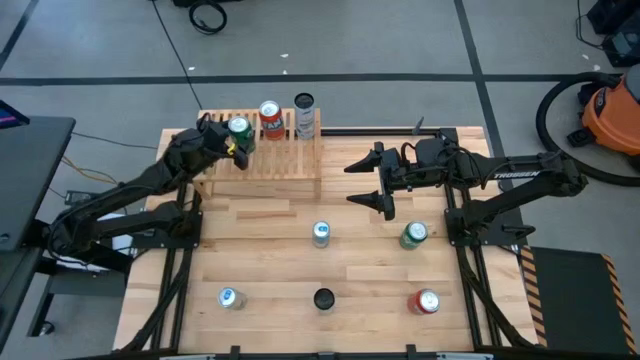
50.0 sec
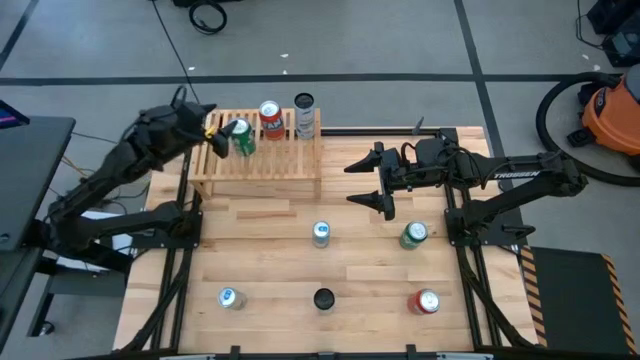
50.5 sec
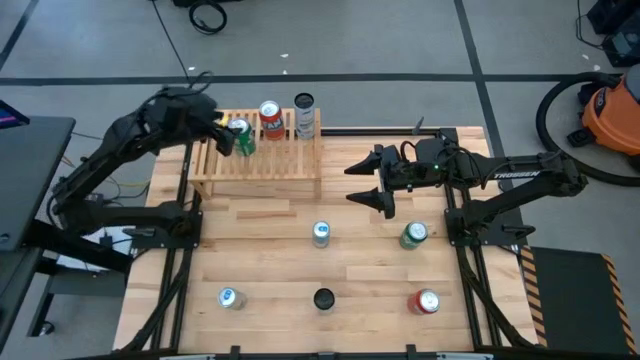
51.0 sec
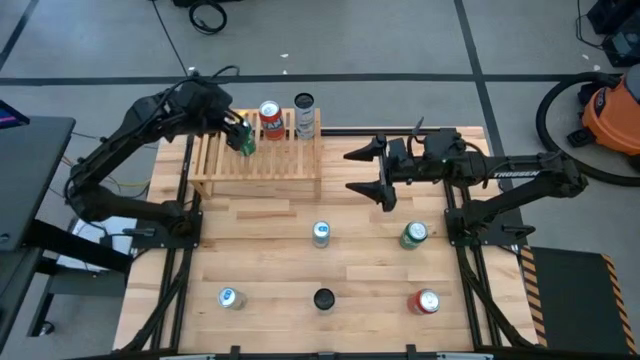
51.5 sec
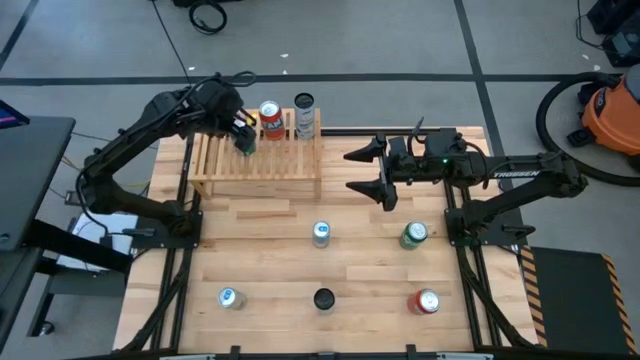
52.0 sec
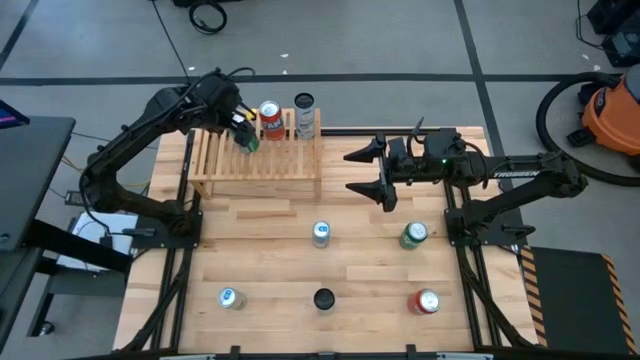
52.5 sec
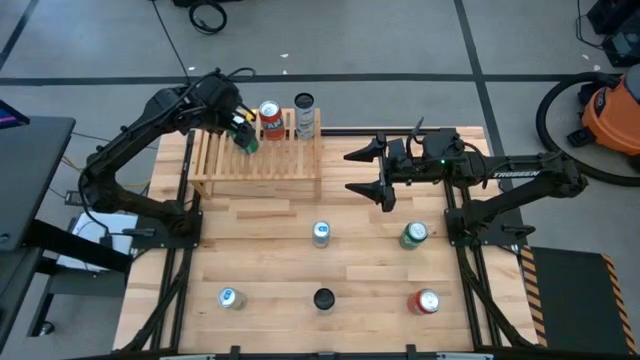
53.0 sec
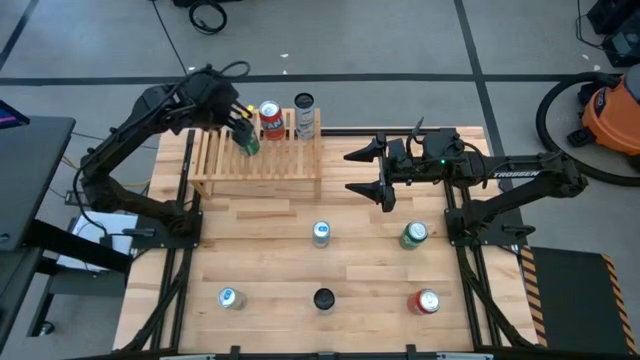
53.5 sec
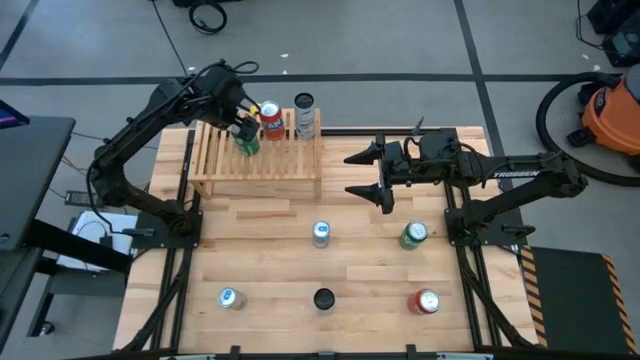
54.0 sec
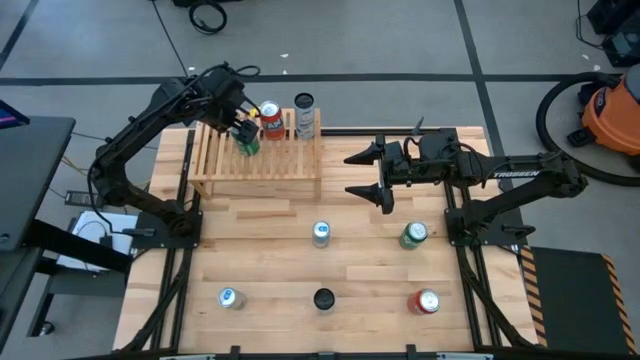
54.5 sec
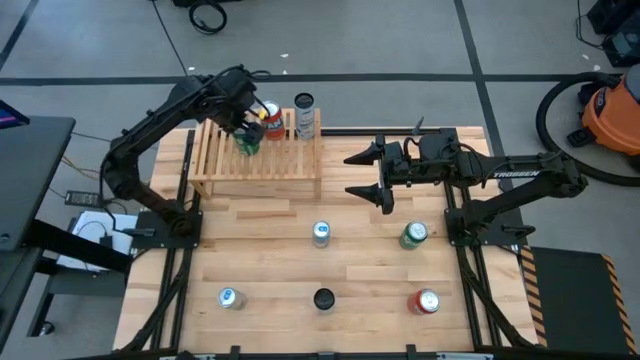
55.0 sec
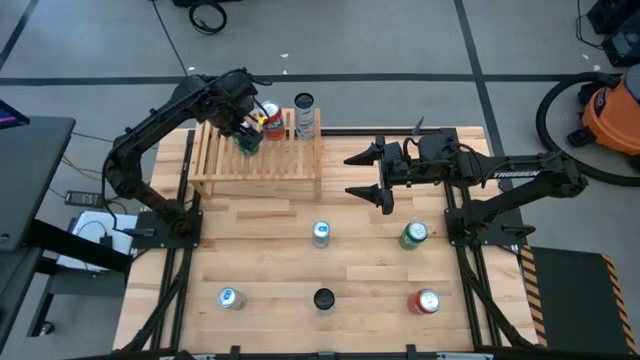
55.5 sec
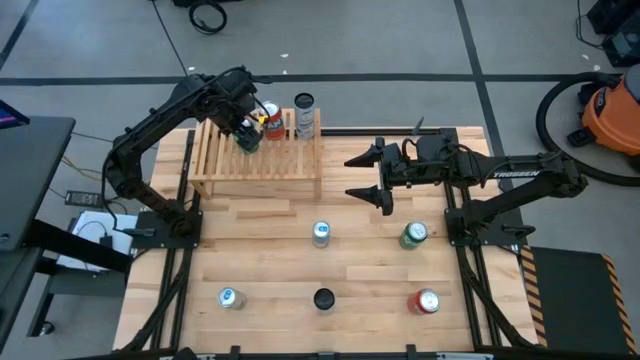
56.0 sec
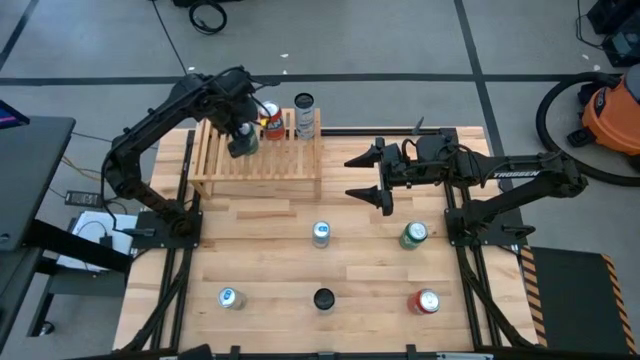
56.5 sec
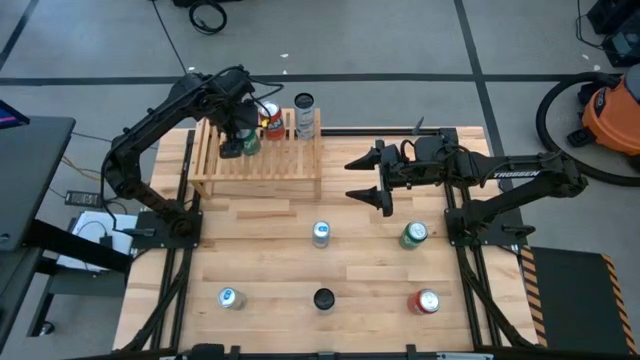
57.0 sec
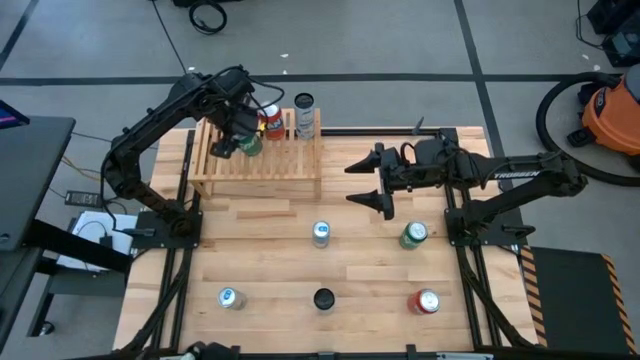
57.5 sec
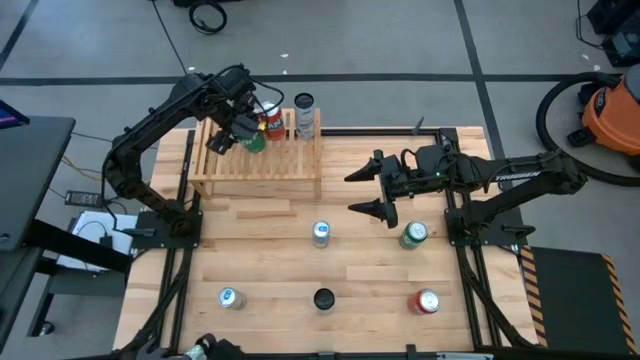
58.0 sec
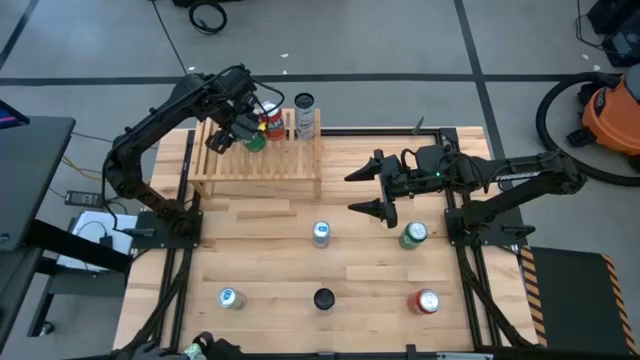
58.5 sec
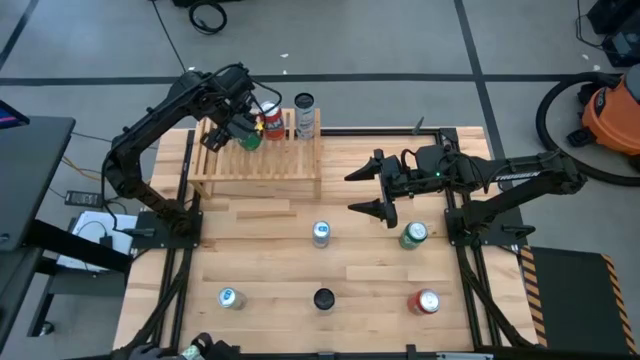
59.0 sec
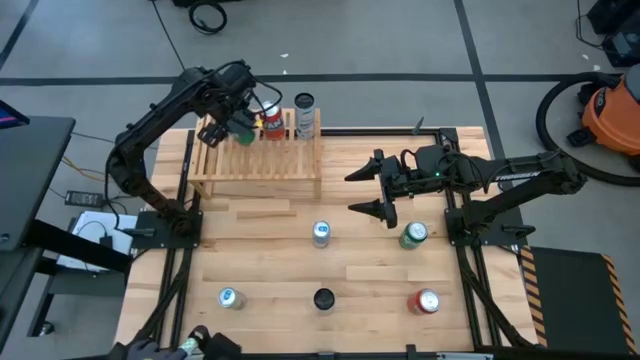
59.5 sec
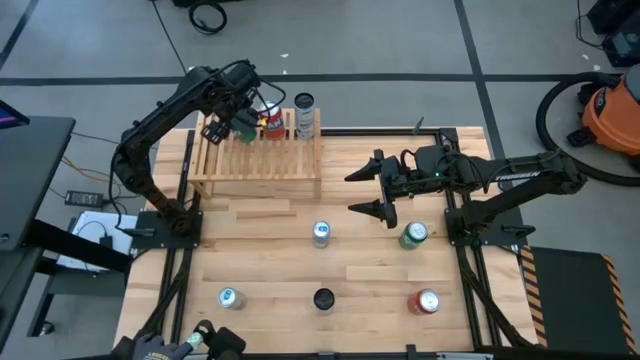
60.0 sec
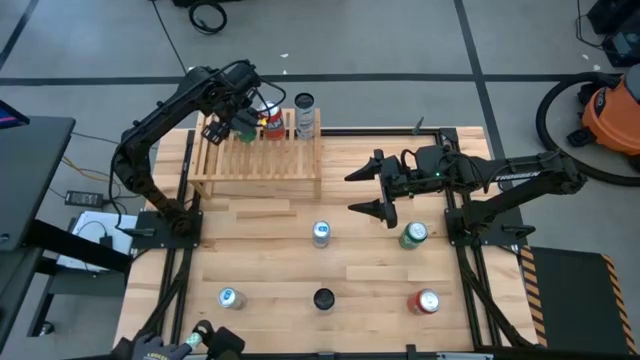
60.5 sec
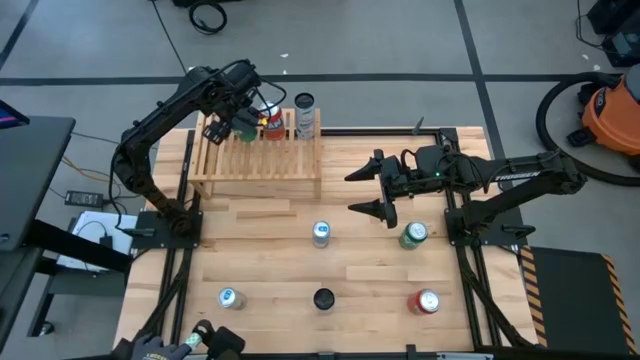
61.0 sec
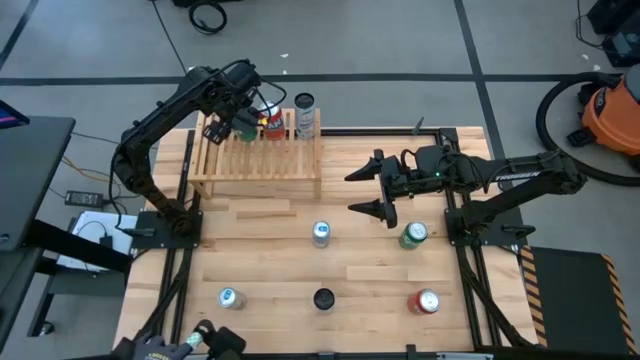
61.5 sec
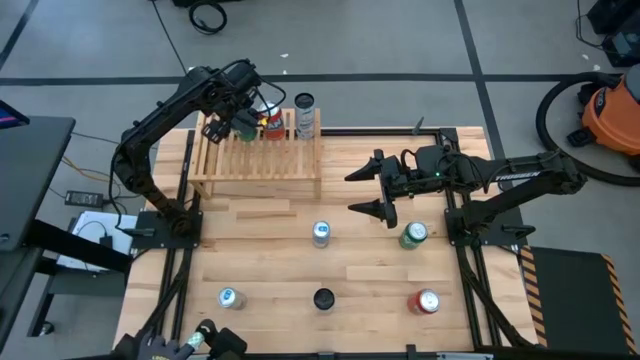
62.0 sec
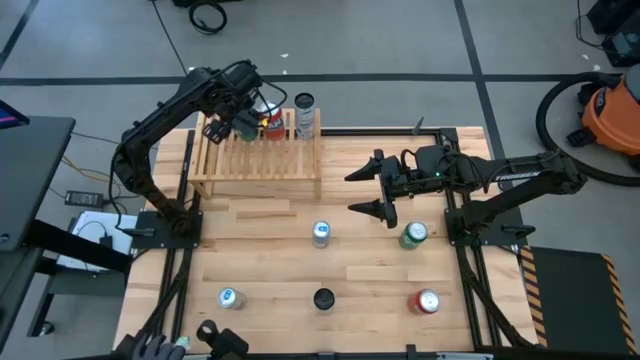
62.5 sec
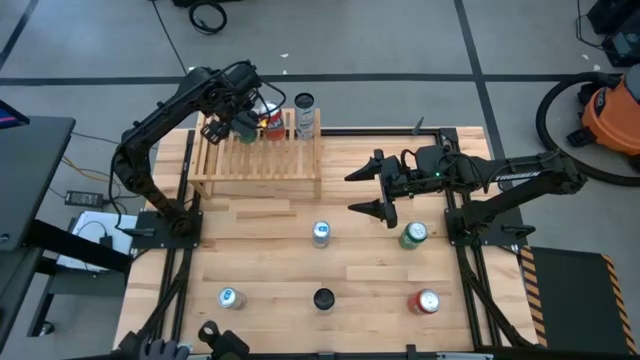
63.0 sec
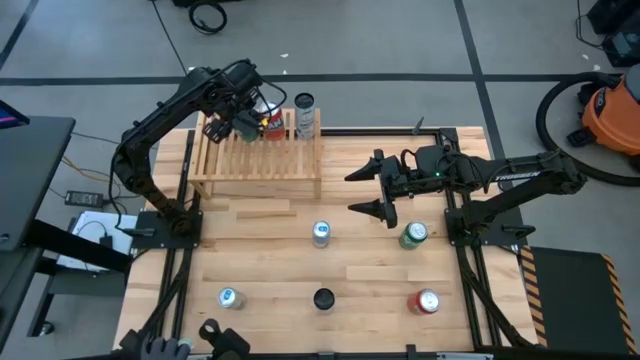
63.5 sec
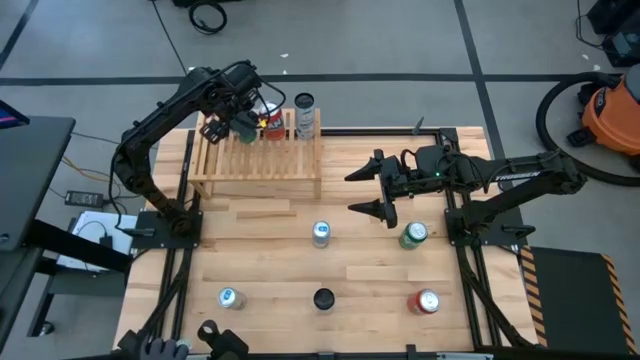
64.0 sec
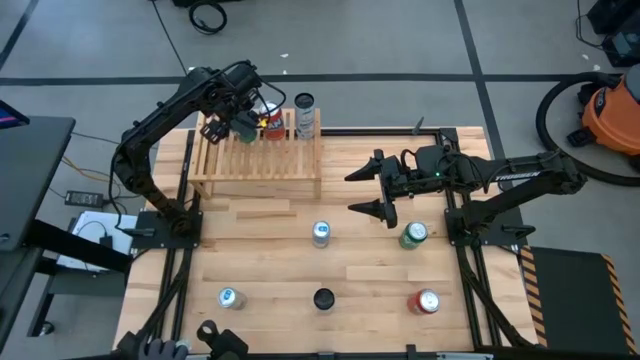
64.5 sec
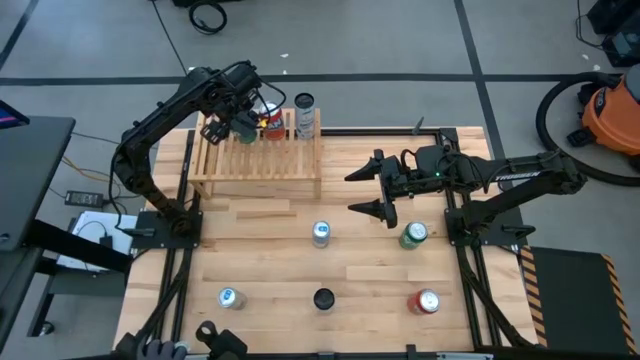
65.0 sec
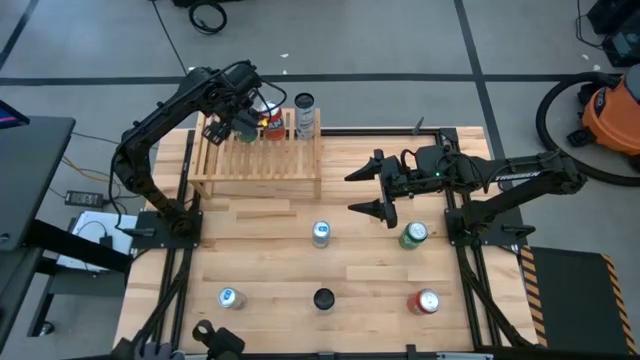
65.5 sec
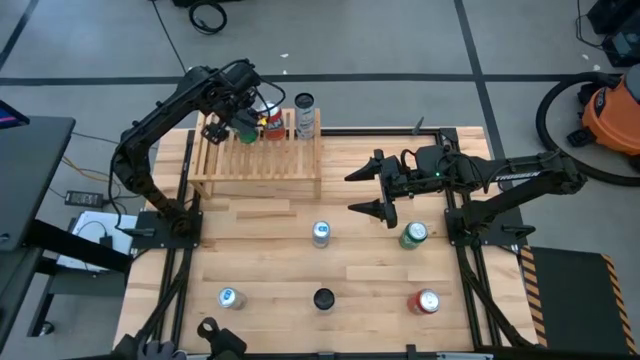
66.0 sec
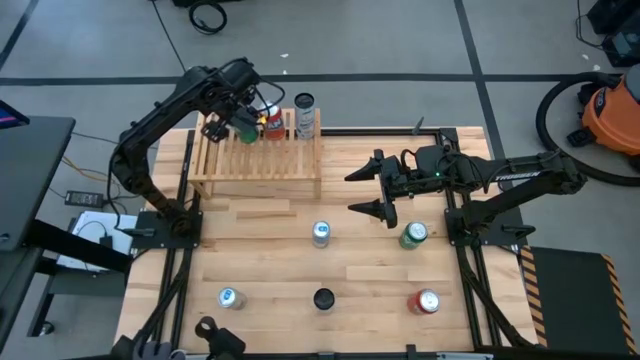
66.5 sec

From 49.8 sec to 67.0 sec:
Task: Place canned beverage on shelf
Put the top green soda can on the shelf

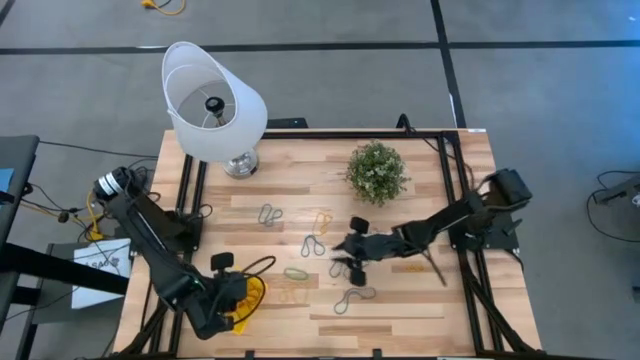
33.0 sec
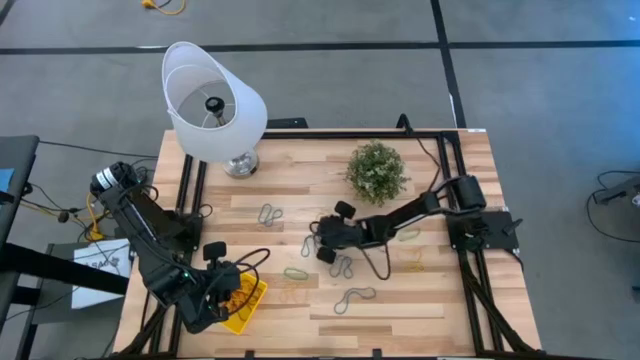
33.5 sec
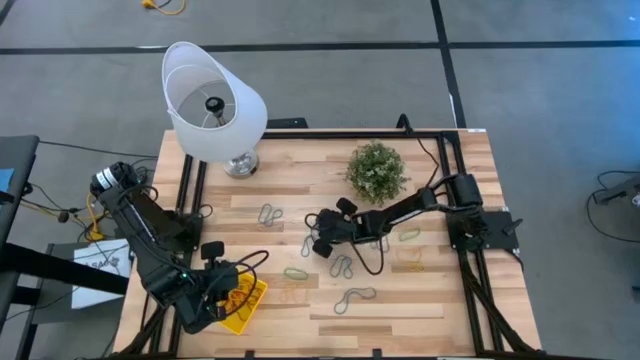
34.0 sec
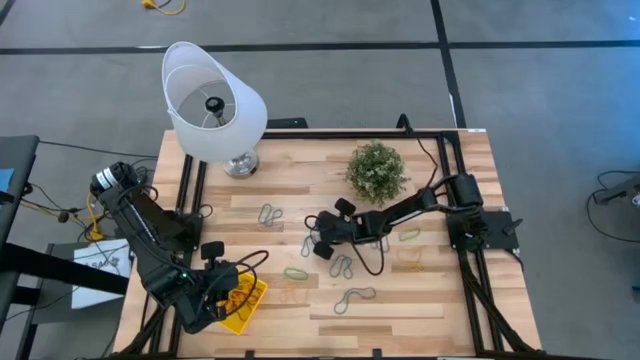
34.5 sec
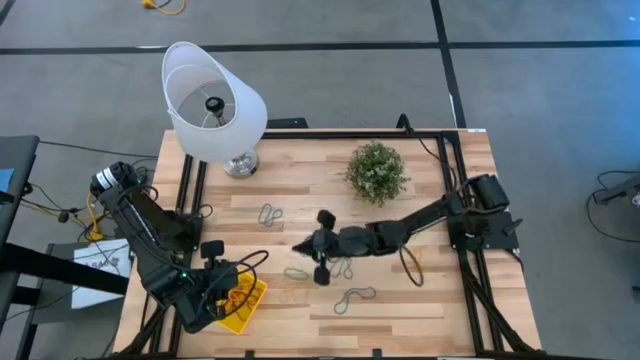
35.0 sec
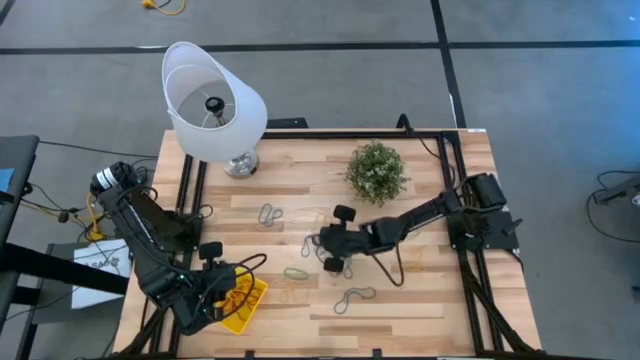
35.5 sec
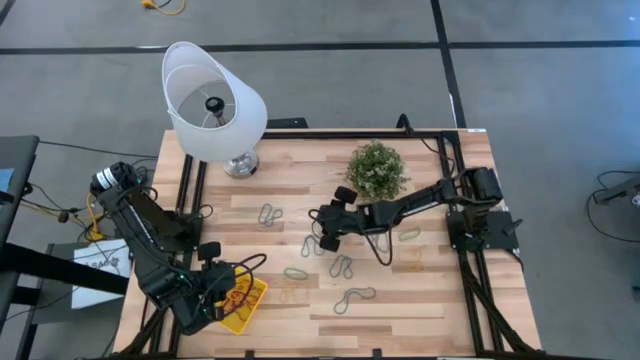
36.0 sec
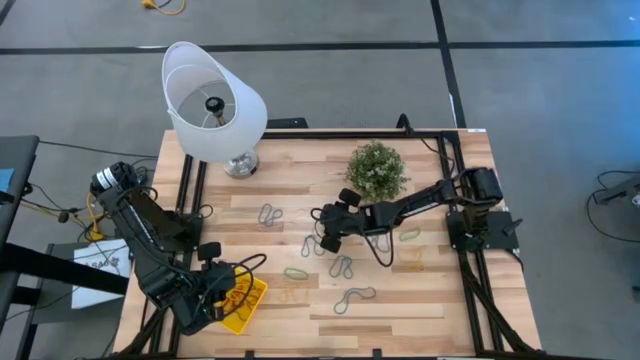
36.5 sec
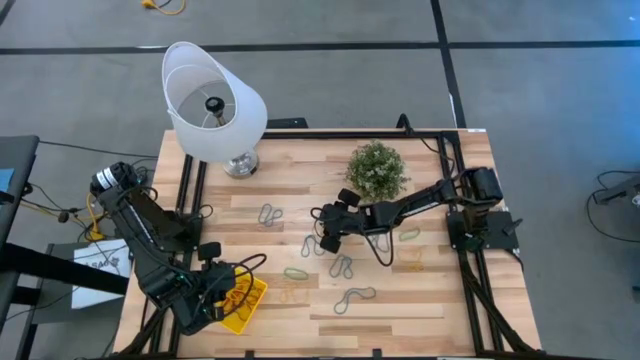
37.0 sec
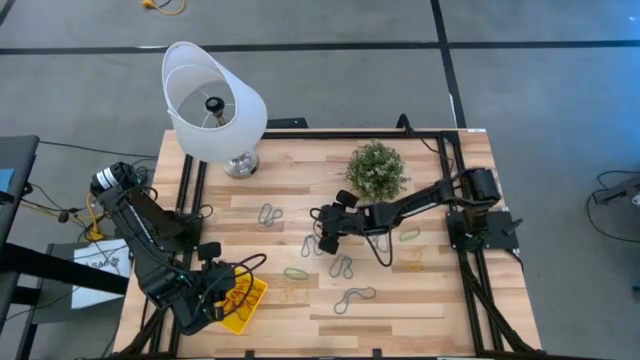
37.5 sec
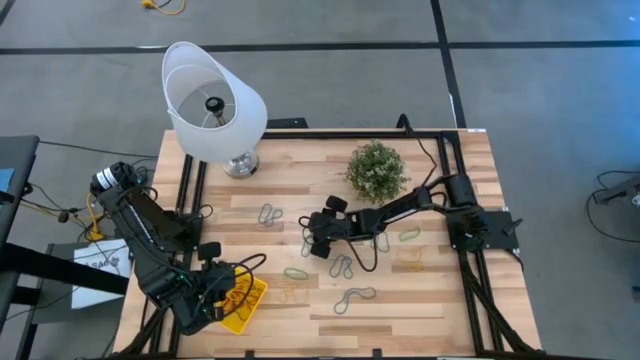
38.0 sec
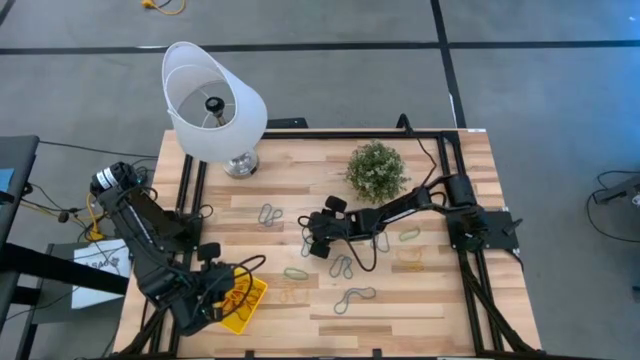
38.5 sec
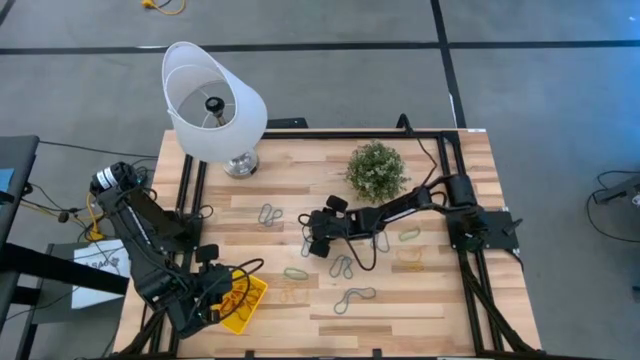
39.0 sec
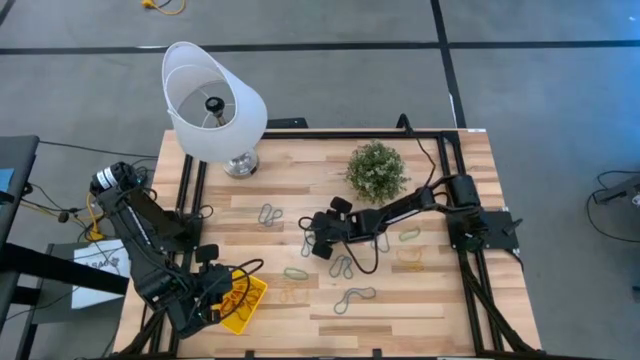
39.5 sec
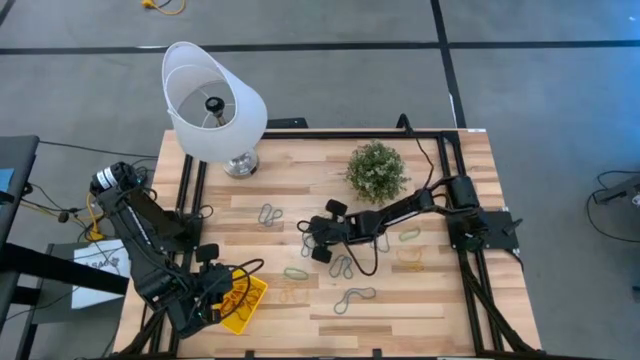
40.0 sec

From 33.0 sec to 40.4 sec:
Task: Pick and place items into bin
Put the top yellow rubberband into the yellow bin
